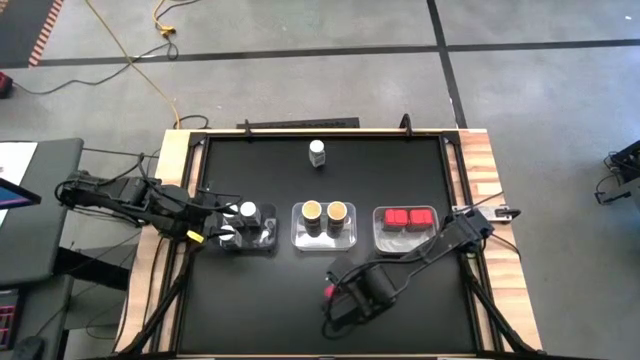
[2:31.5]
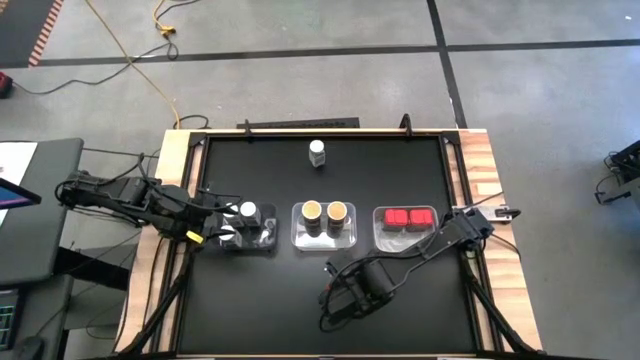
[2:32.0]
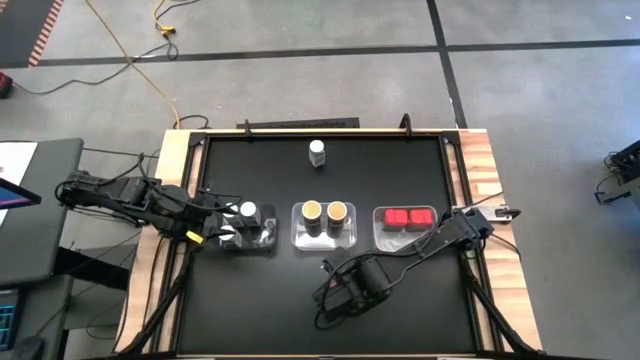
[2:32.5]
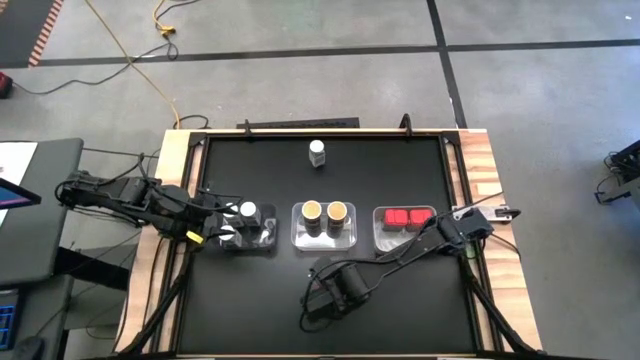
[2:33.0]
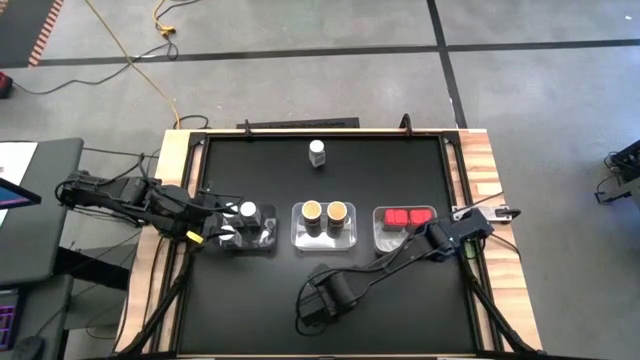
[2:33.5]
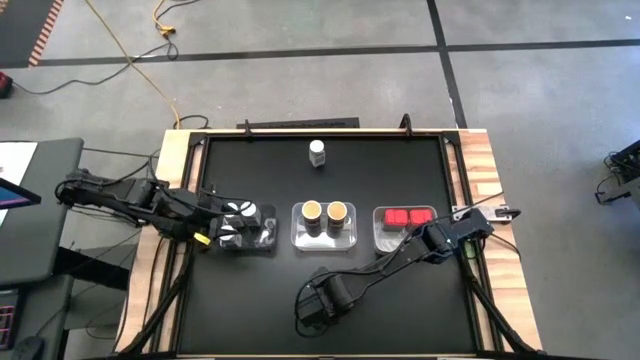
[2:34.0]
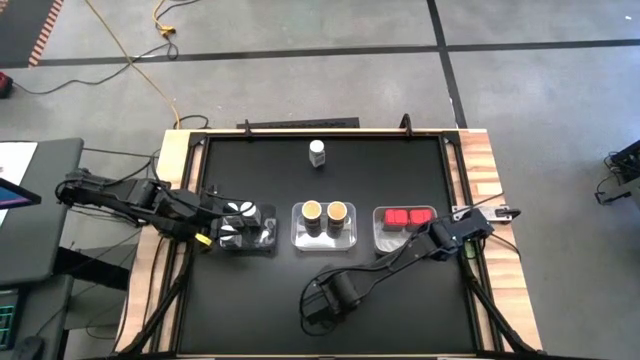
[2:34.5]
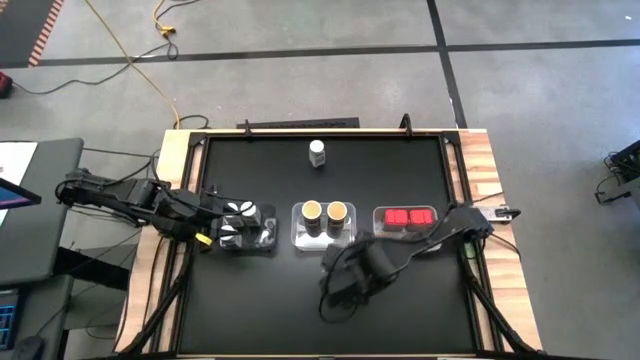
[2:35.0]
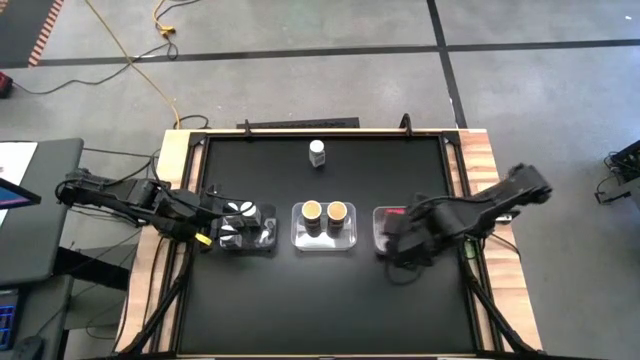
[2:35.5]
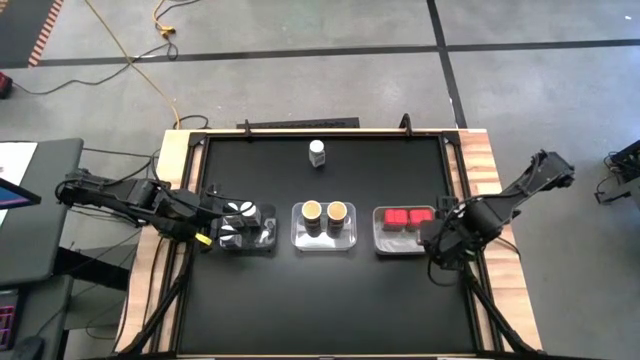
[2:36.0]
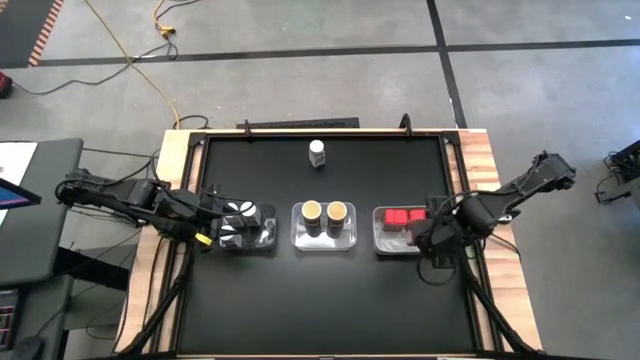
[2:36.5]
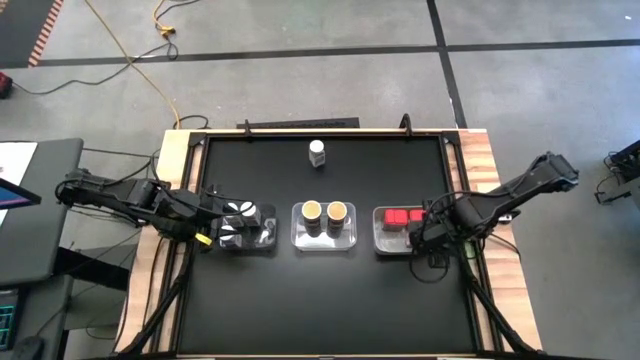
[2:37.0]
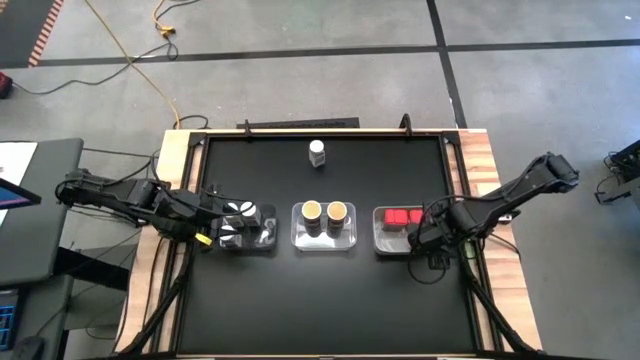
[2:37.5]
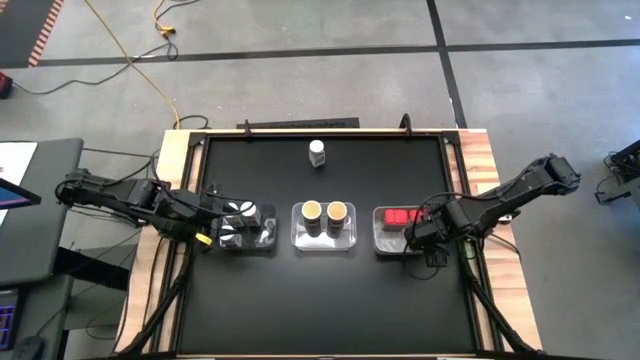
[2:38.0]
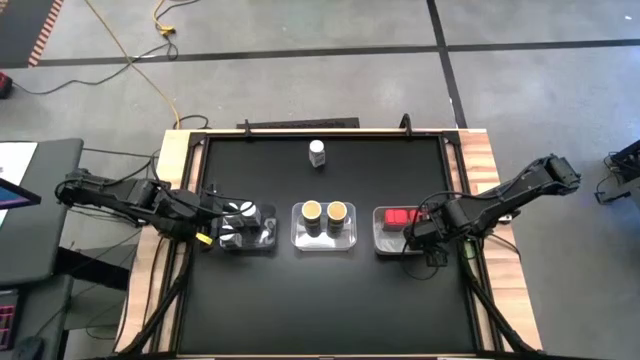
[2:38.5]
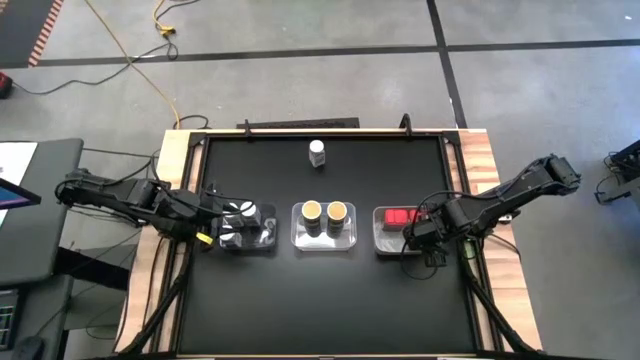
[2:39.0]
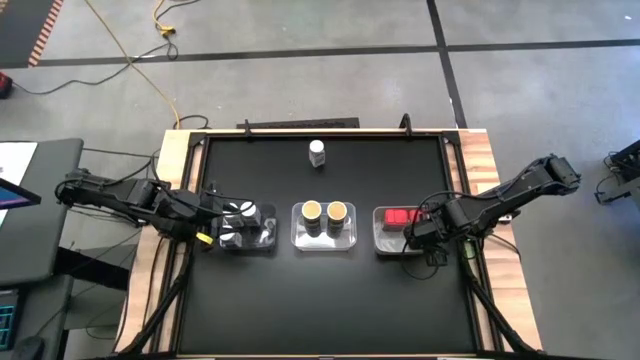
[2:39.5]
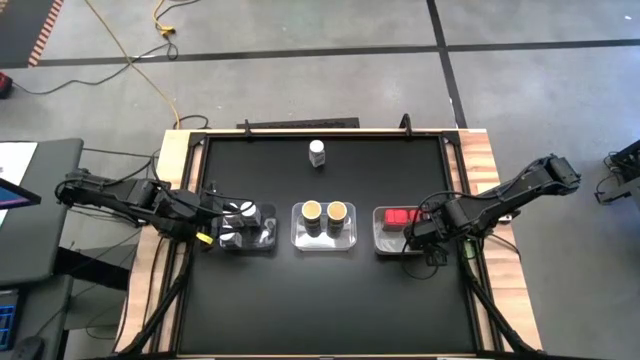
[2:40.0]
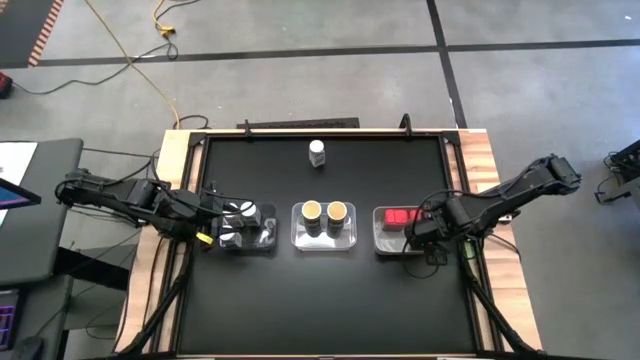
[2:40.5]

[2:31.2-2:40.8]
Task: Sort spices by type
Put the red seasoning bottle into the gray bin

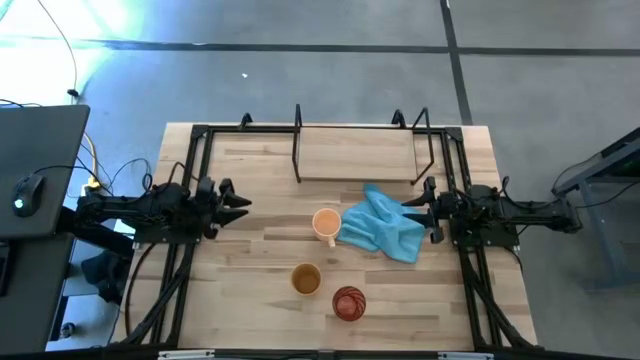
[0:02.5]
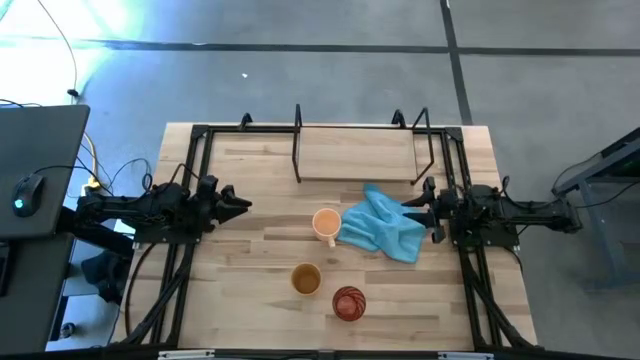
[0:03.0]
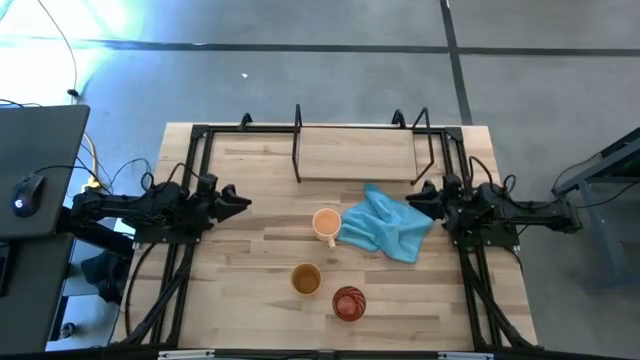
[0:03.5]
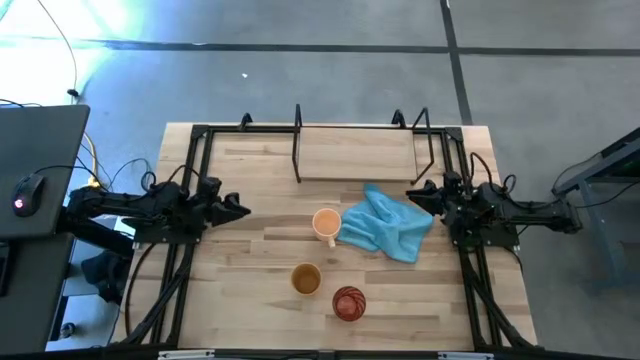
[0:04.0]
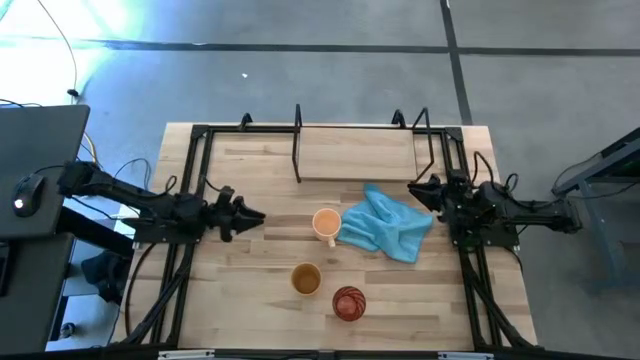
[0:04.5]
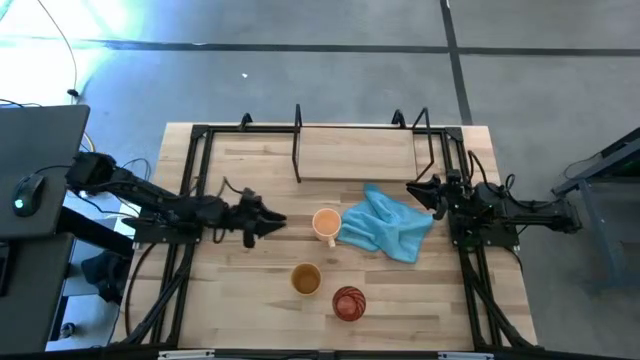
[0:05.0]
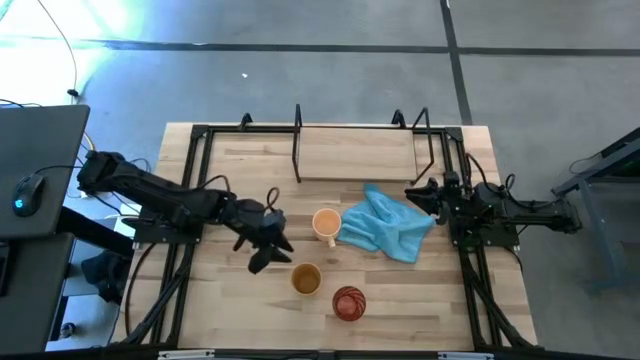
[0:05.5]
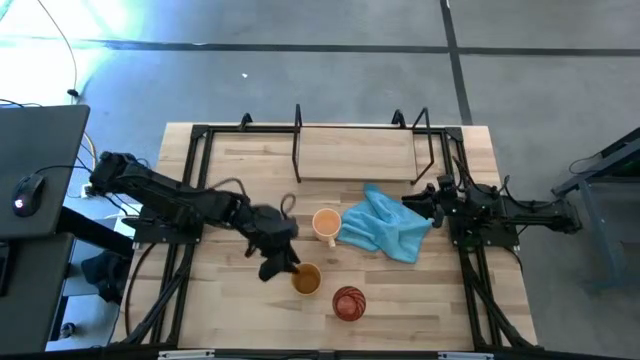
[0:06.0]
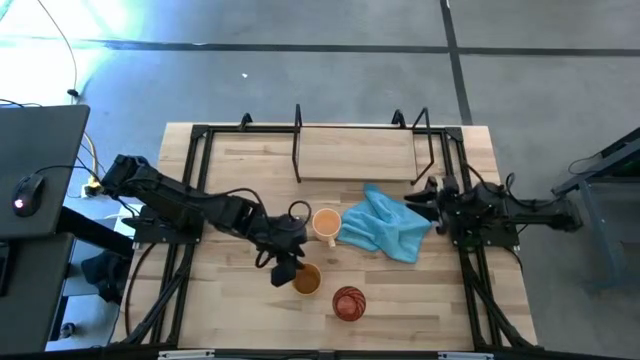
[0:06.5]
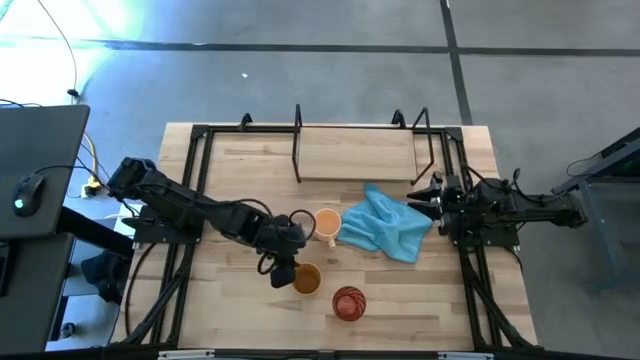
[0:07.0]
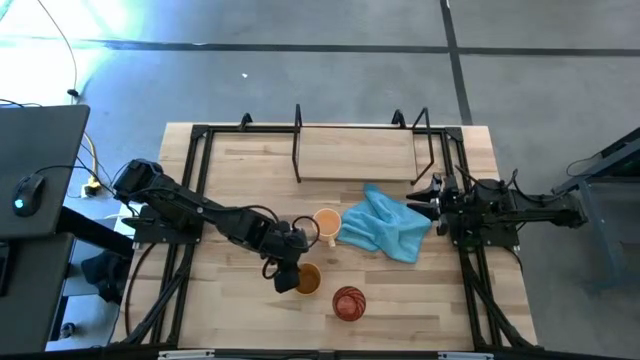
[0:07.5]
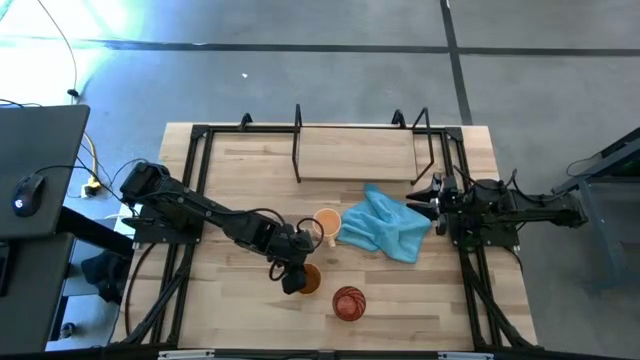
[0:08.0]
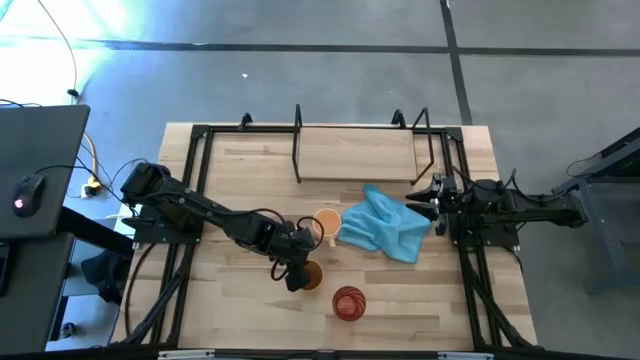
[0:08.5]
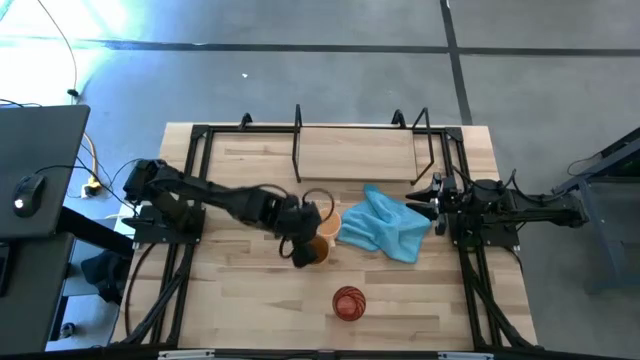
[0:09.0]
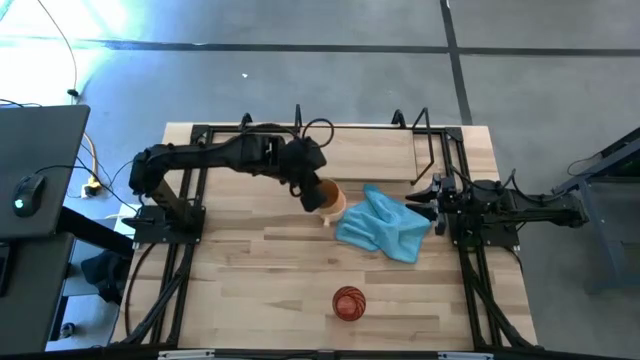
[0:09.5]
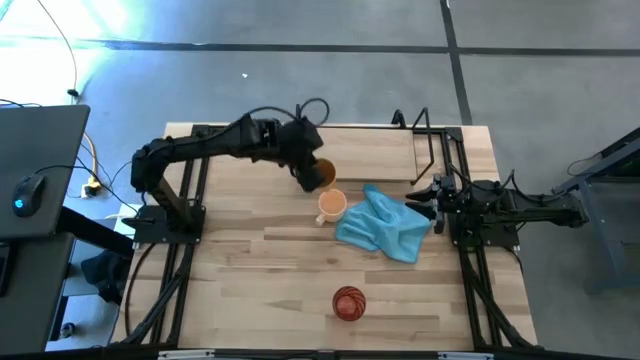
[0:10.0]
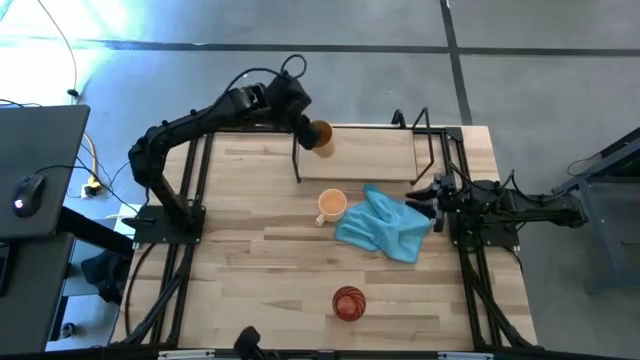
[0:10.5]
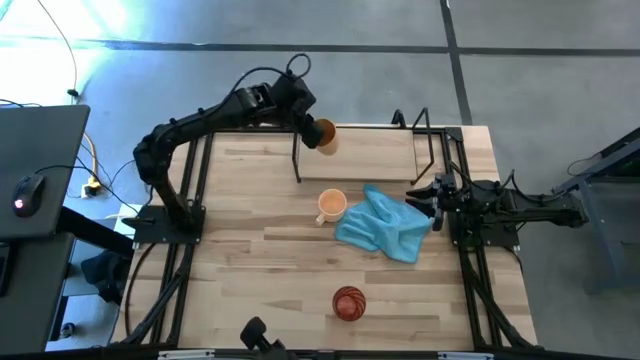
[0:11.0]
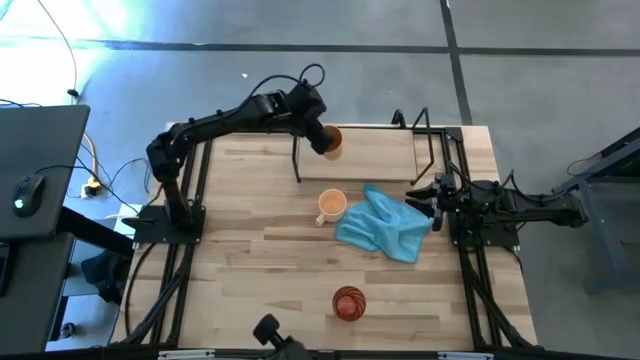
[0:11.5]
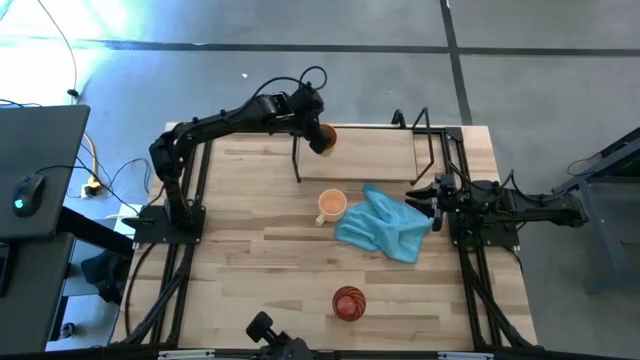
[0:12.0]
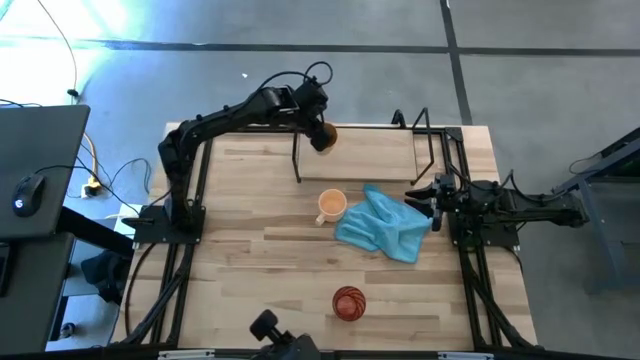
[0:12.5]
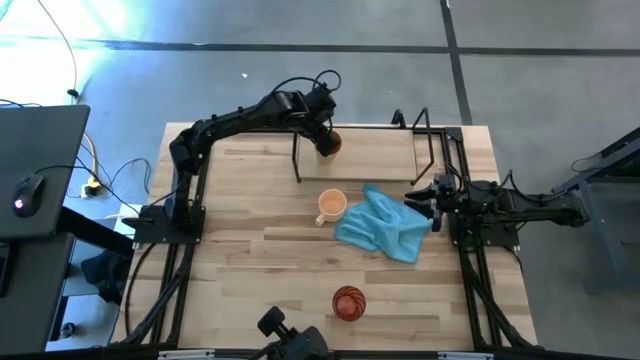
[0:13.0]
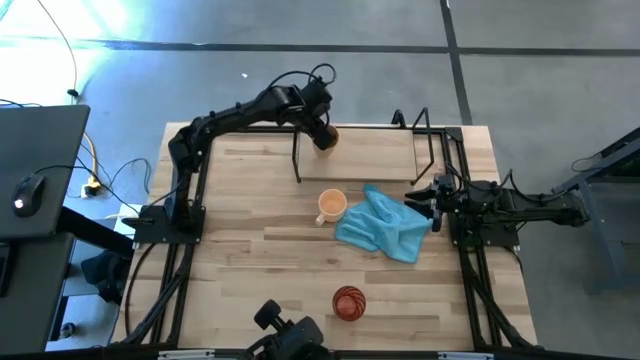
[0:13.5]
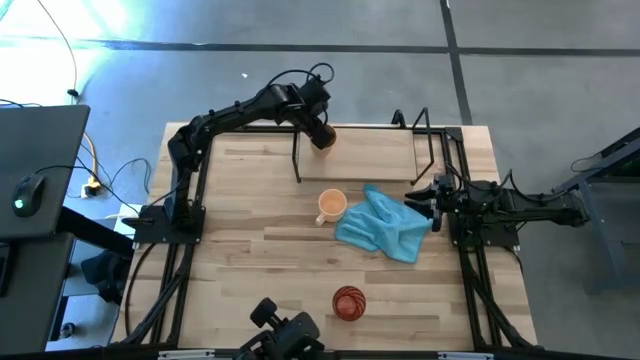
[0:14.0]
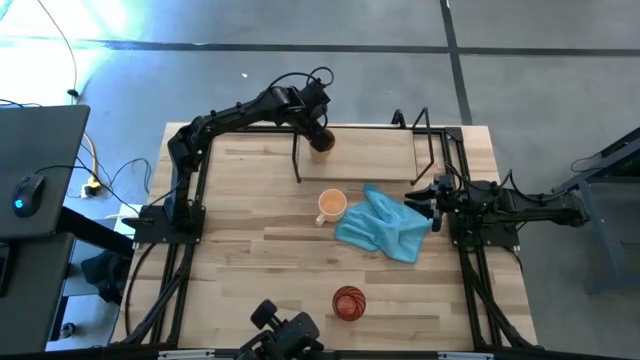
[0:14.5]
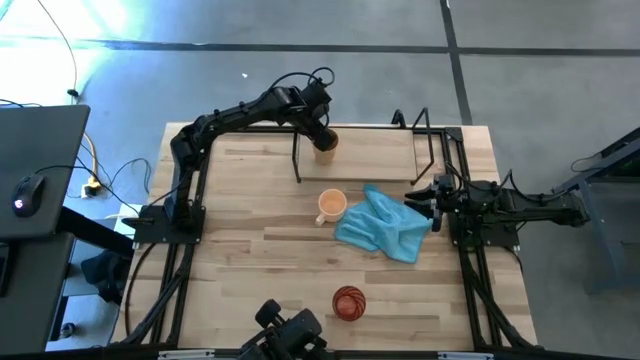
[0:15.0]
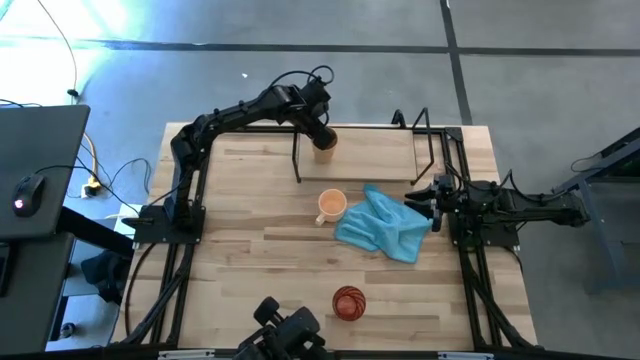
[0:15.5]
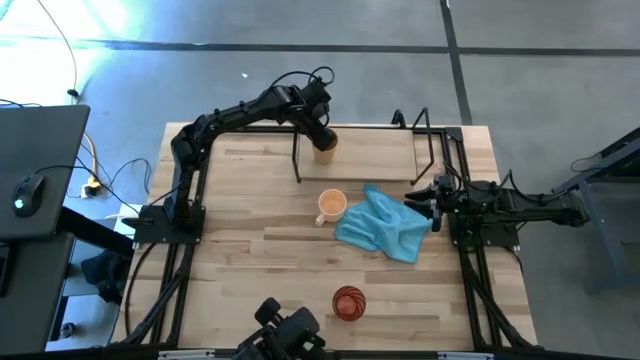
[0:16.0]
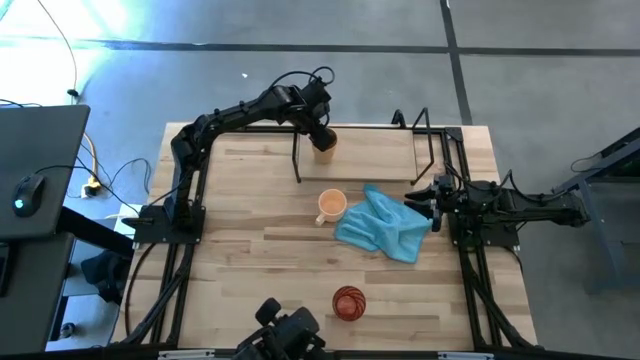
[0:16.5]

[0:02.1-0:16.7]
Task: Stack small to large cups/mugs on shelf
Put the yellow cup on the shelf
